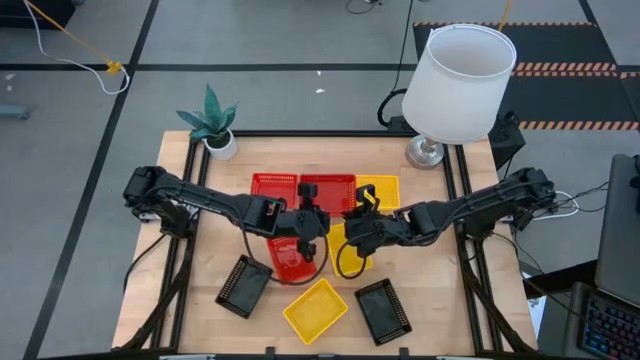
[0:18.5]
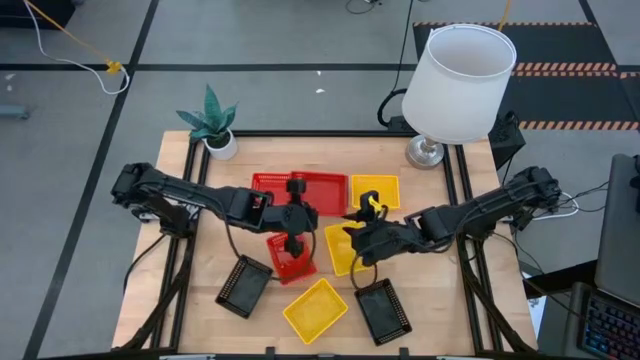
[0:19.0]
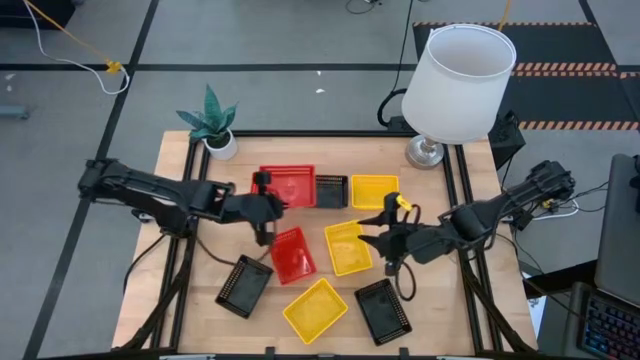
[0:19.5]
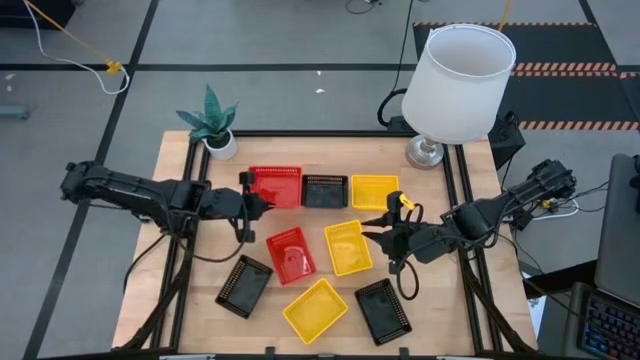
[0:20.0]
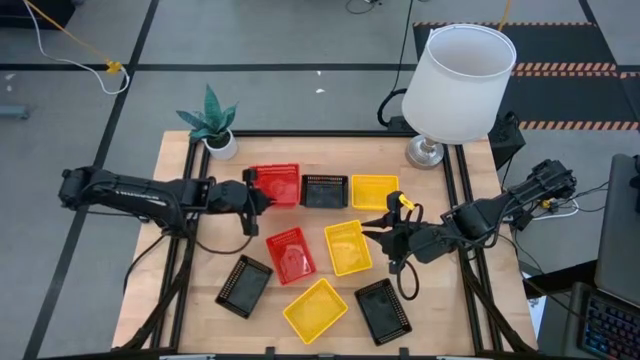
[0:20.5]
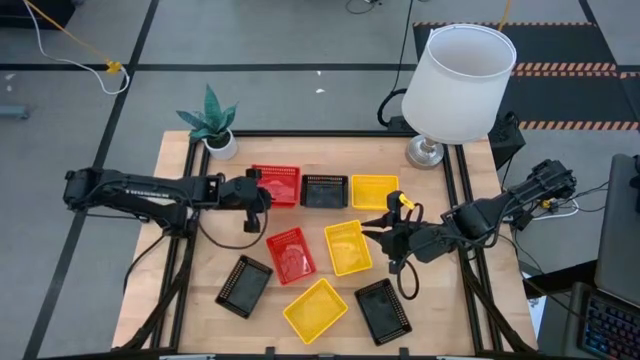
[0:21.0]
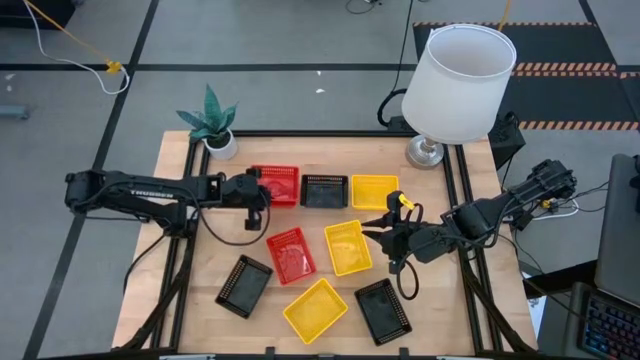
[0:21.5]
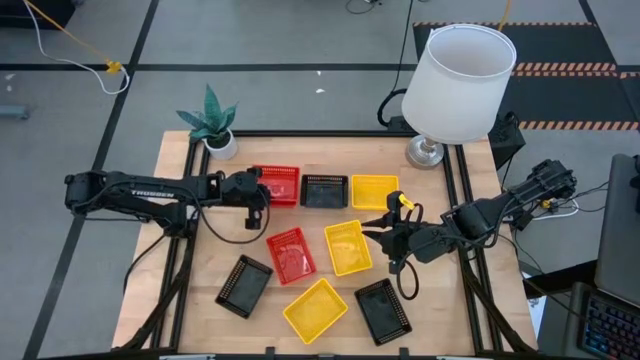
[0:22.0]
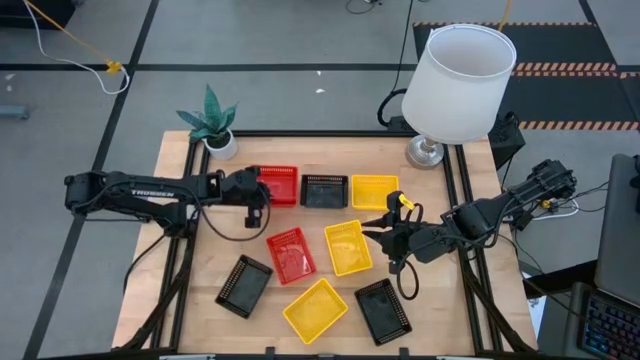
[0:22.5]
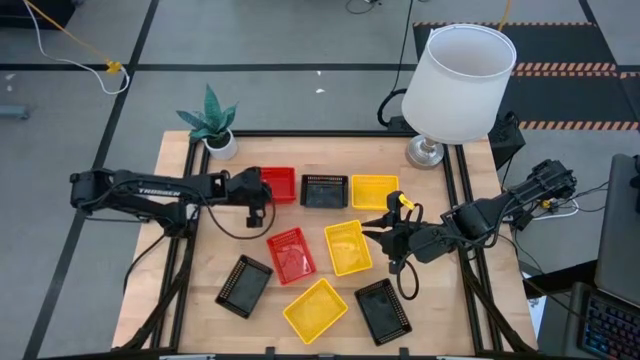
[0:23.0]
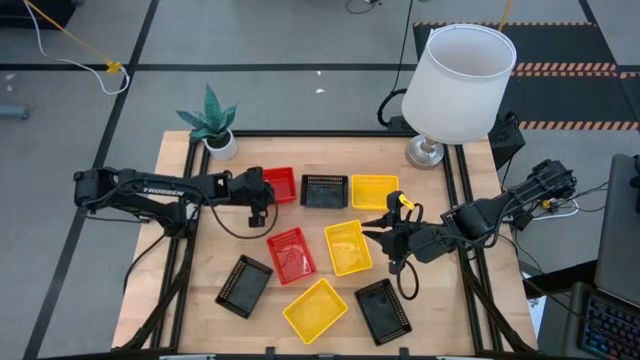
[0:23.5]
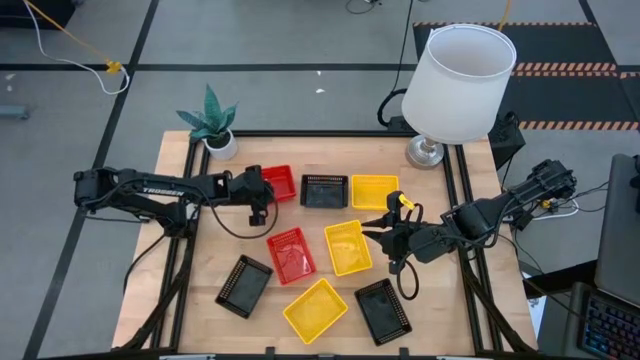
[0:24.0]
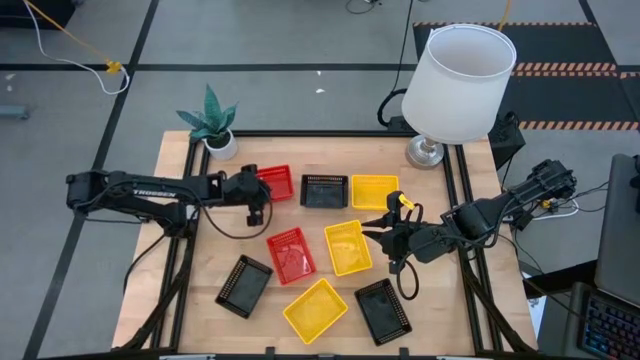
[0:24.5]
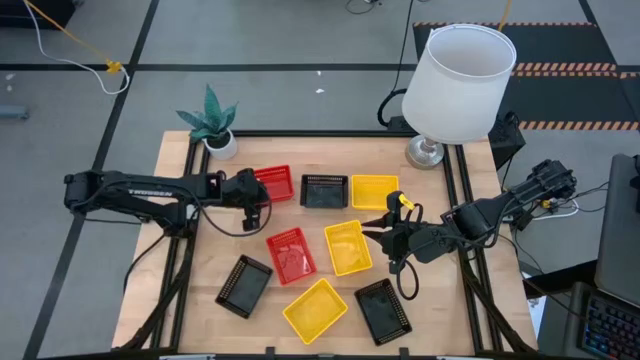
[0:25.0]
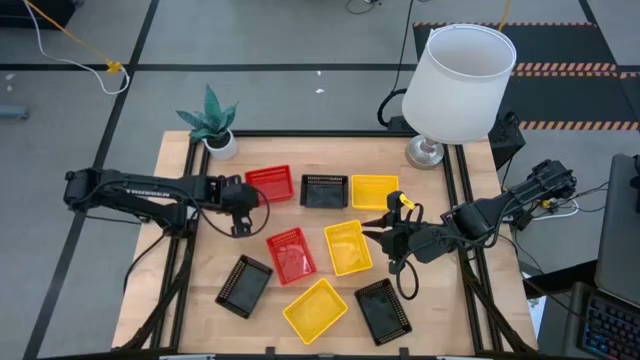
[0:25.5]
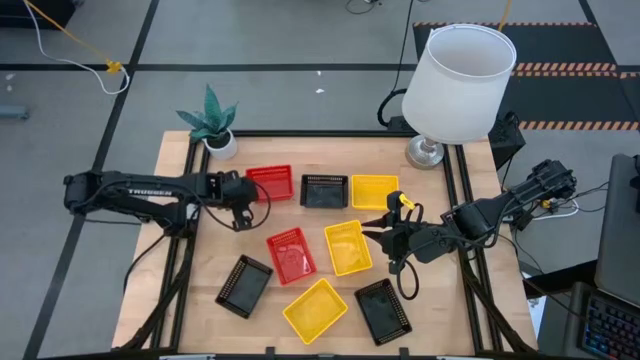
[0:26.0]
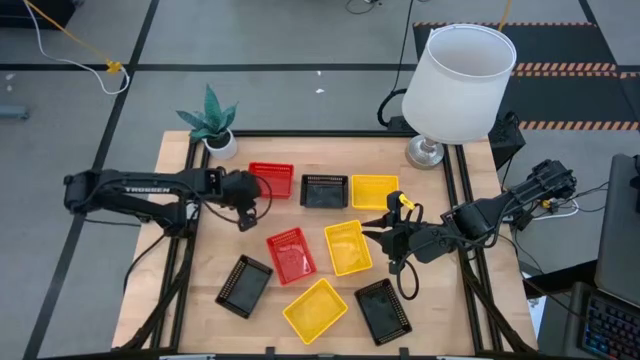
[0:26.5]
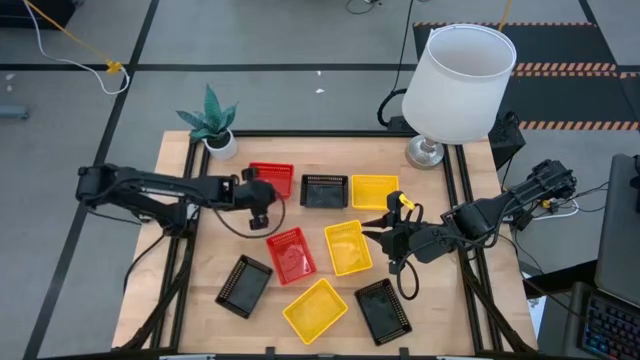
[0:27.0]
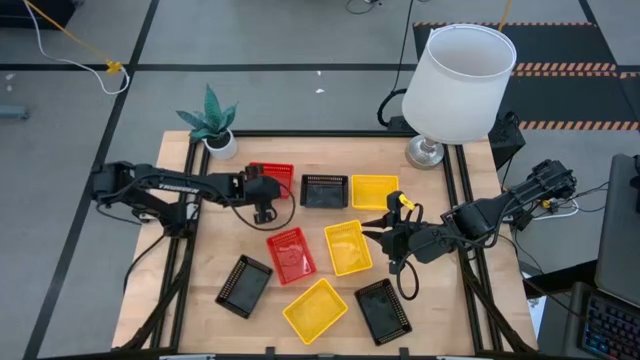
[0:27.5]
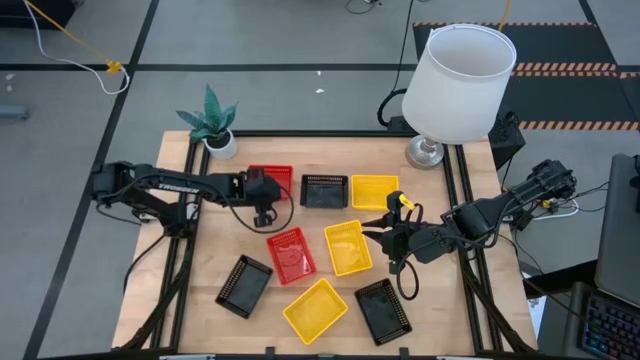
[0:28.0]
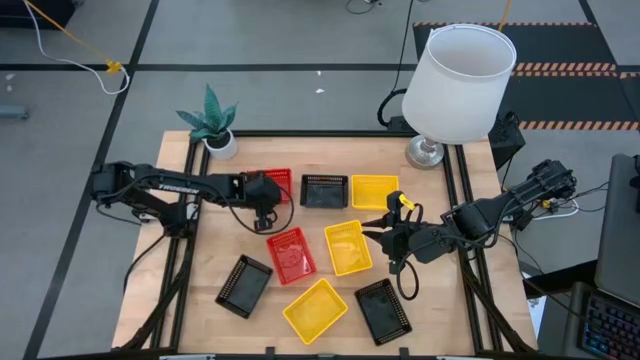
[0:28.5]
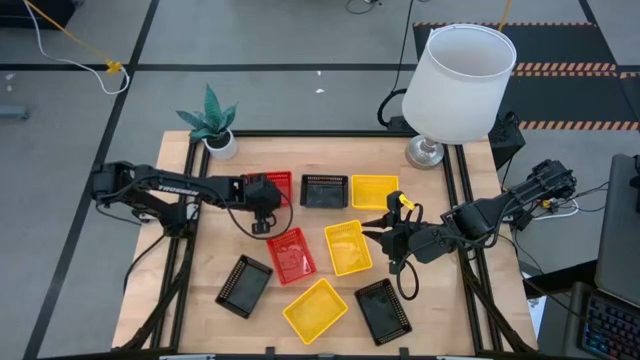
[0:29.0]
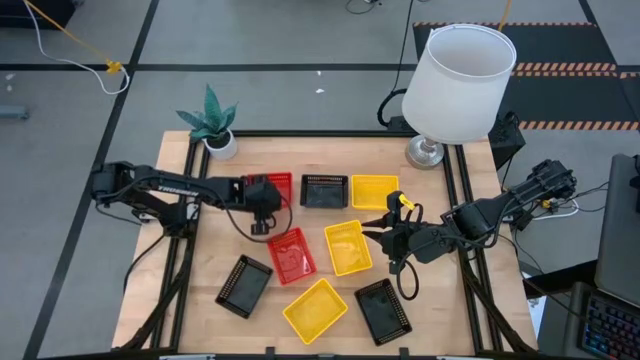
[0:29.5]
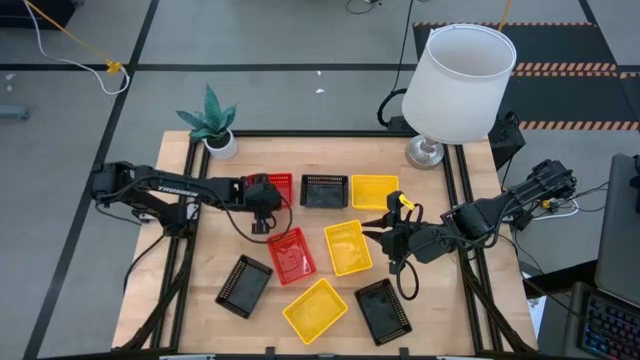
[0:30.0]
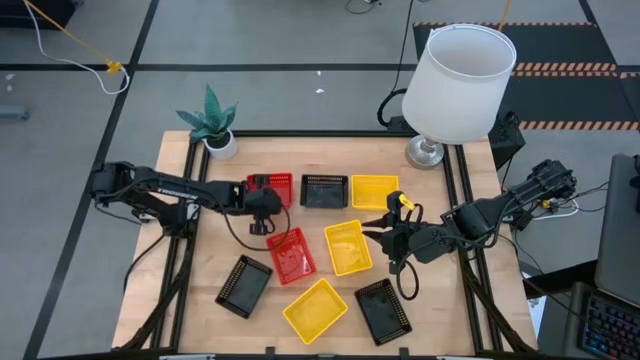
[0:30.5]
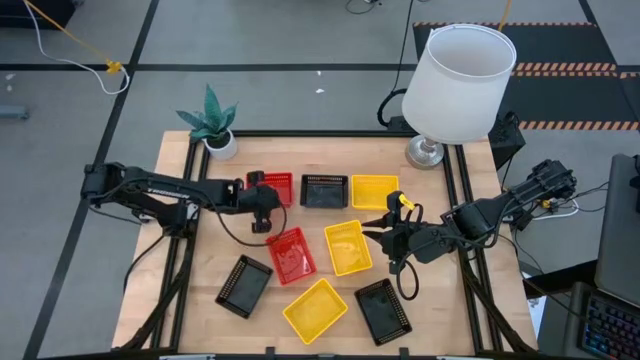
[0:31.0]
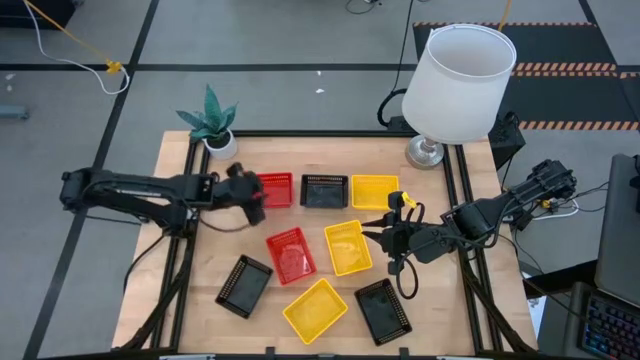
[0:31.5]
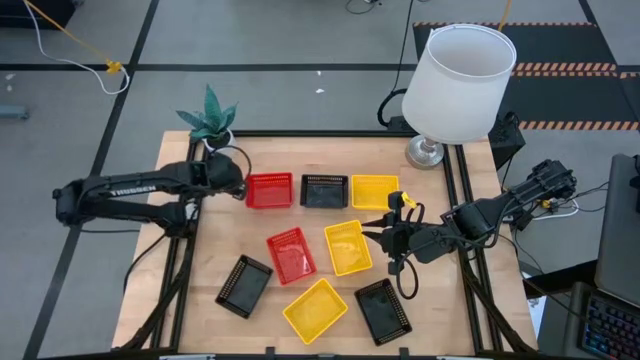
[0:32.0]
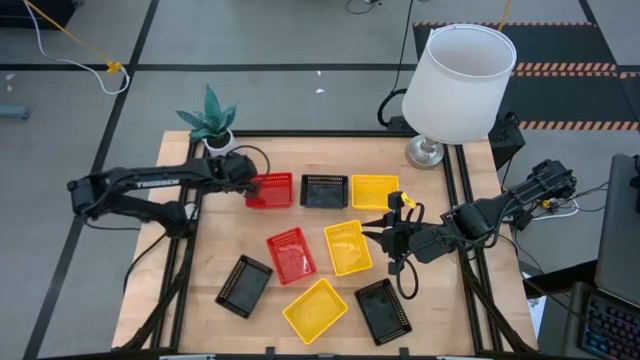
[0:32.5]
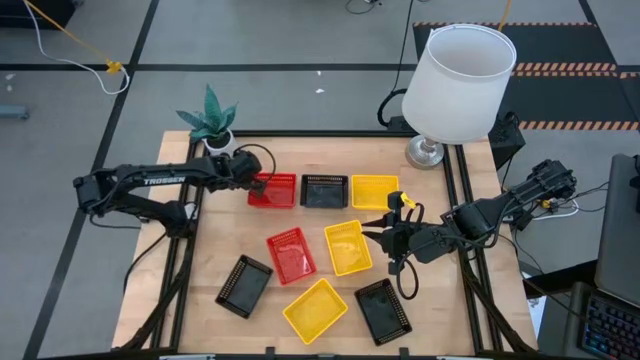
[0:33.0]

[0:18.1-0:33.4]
Stack the bottom right red bin on top of the top red bin
